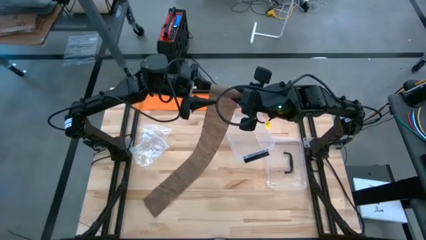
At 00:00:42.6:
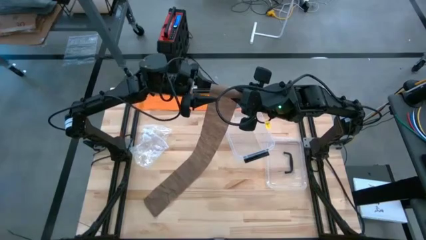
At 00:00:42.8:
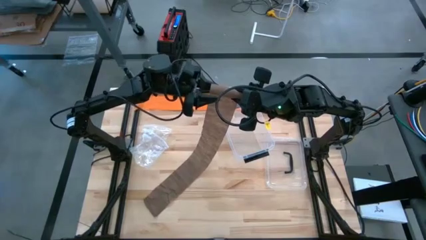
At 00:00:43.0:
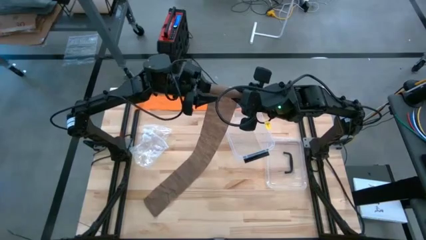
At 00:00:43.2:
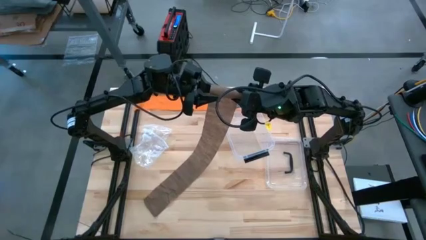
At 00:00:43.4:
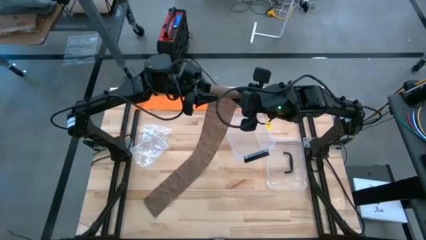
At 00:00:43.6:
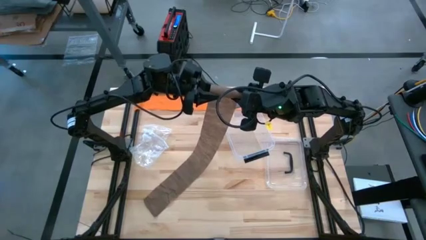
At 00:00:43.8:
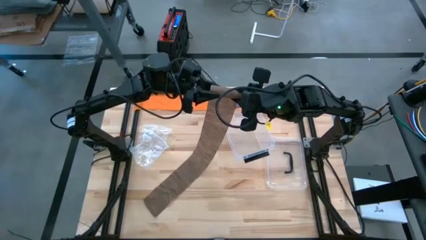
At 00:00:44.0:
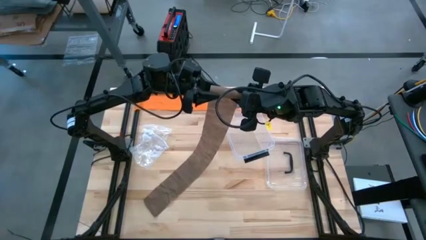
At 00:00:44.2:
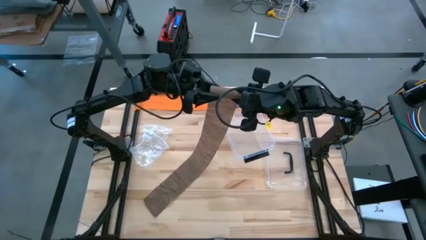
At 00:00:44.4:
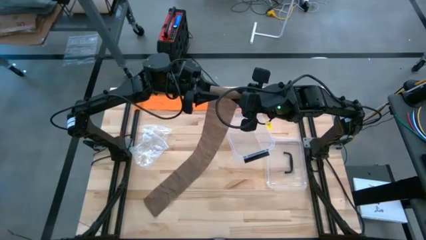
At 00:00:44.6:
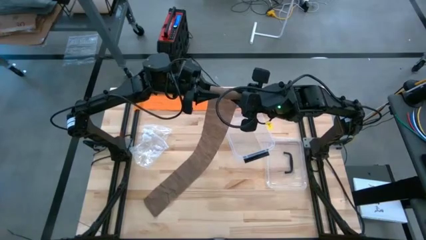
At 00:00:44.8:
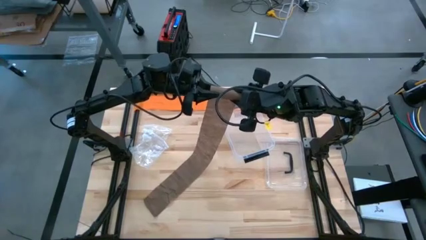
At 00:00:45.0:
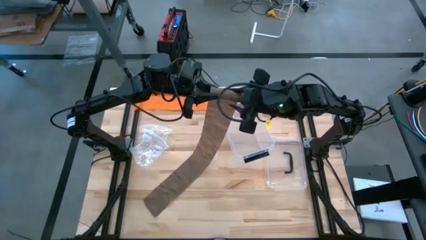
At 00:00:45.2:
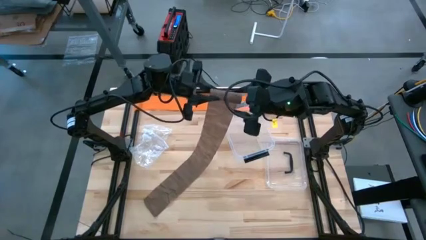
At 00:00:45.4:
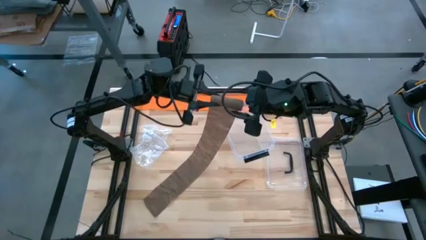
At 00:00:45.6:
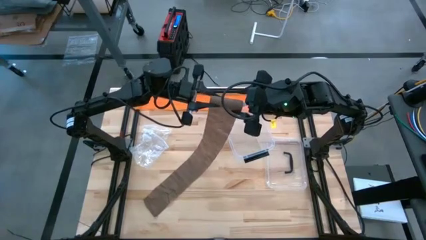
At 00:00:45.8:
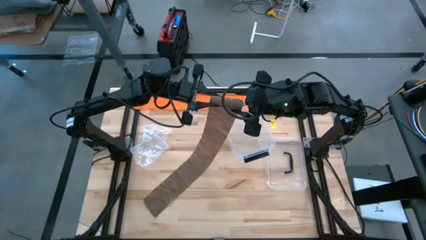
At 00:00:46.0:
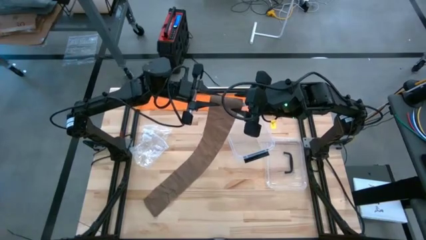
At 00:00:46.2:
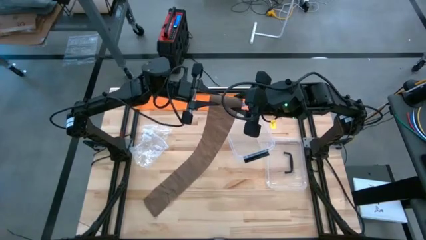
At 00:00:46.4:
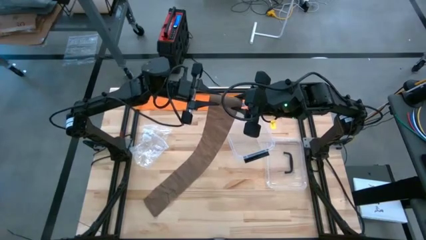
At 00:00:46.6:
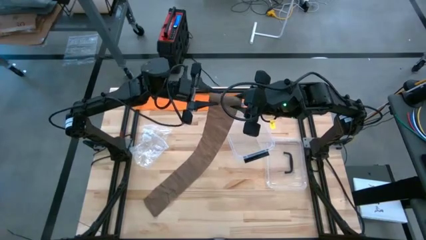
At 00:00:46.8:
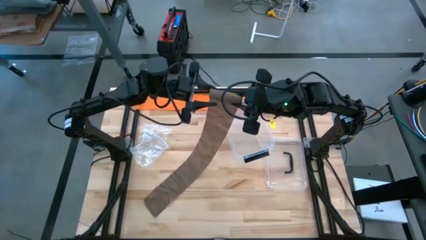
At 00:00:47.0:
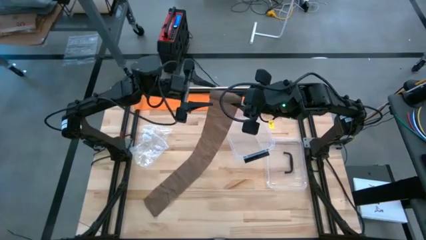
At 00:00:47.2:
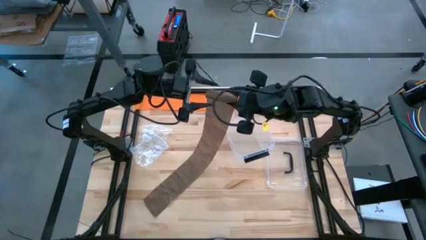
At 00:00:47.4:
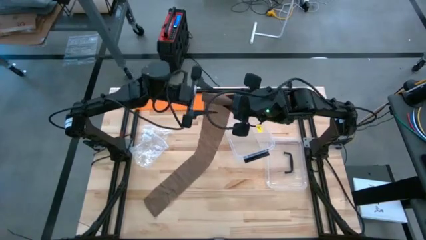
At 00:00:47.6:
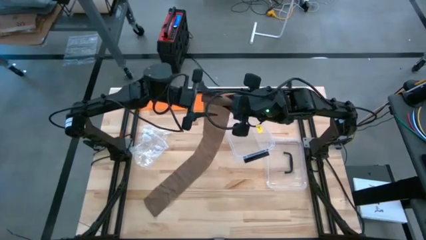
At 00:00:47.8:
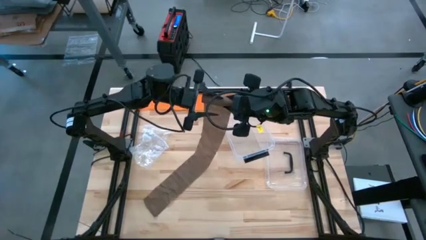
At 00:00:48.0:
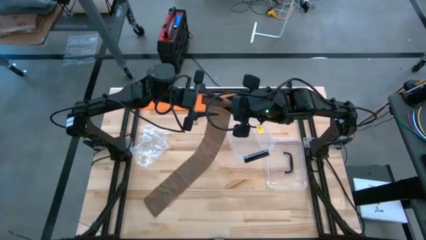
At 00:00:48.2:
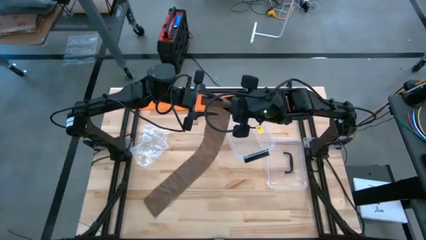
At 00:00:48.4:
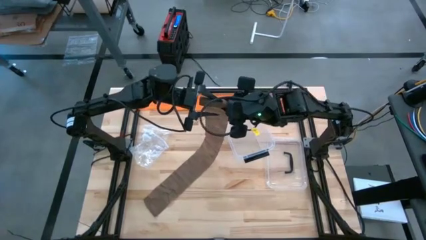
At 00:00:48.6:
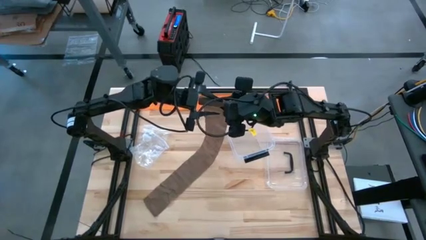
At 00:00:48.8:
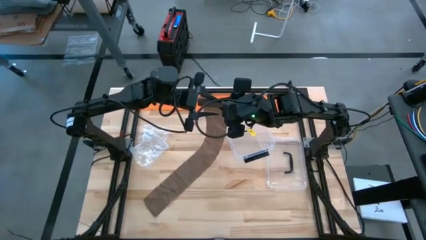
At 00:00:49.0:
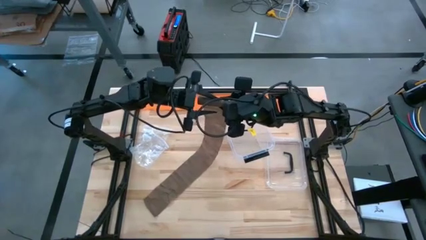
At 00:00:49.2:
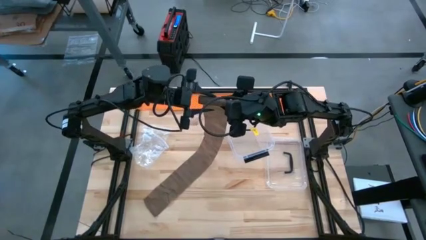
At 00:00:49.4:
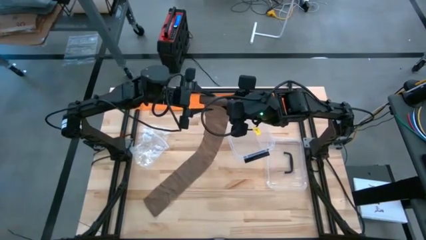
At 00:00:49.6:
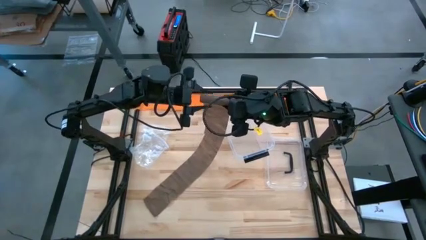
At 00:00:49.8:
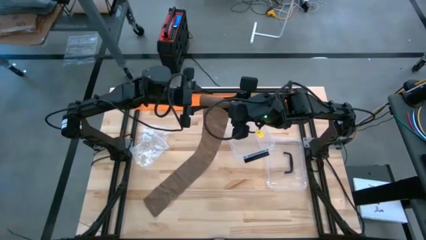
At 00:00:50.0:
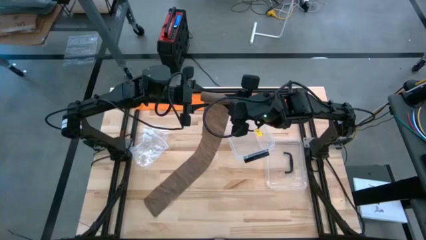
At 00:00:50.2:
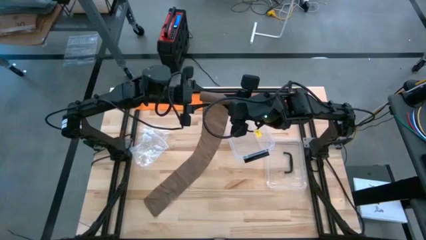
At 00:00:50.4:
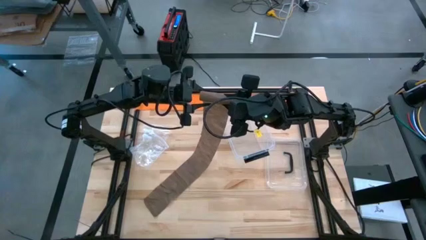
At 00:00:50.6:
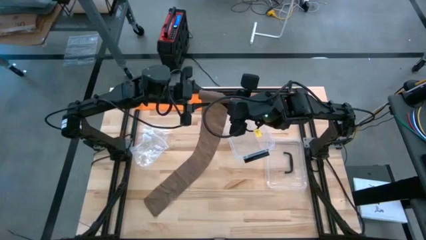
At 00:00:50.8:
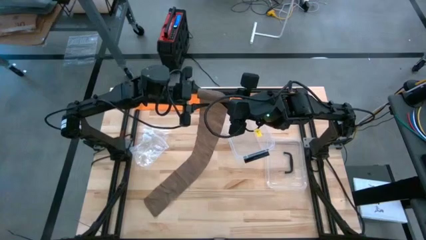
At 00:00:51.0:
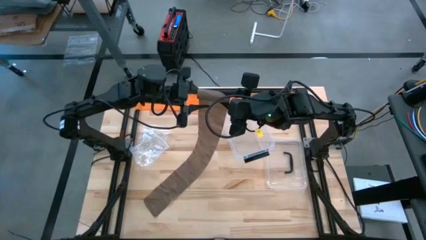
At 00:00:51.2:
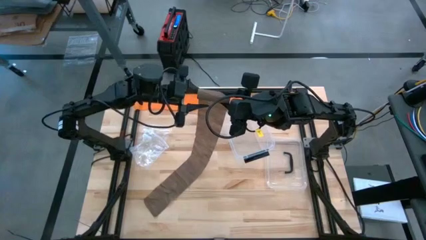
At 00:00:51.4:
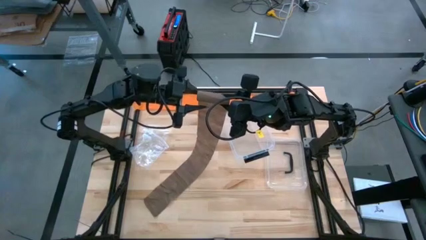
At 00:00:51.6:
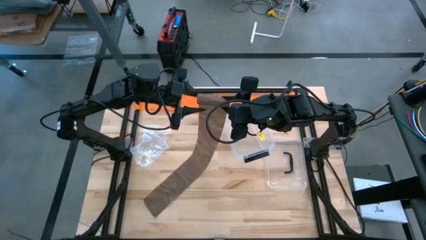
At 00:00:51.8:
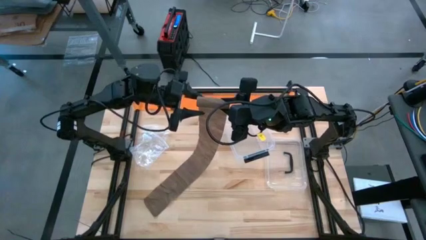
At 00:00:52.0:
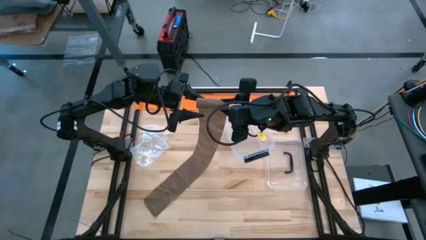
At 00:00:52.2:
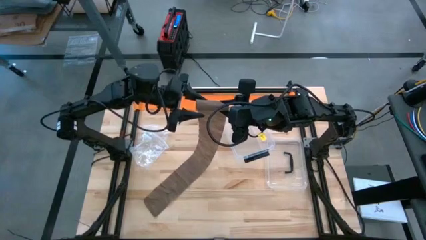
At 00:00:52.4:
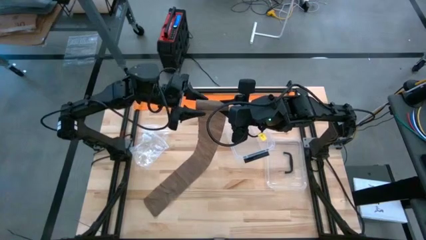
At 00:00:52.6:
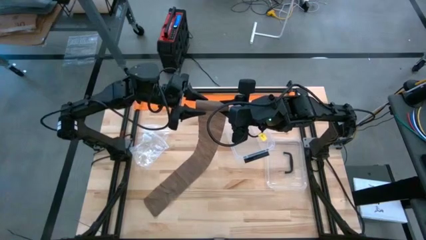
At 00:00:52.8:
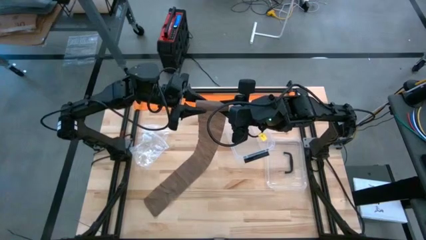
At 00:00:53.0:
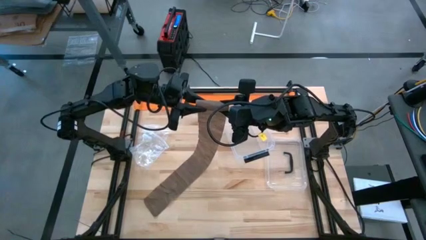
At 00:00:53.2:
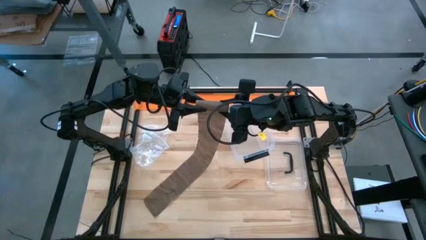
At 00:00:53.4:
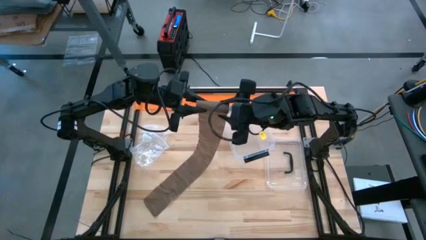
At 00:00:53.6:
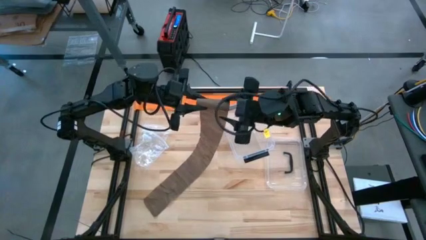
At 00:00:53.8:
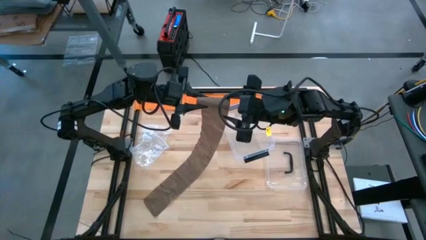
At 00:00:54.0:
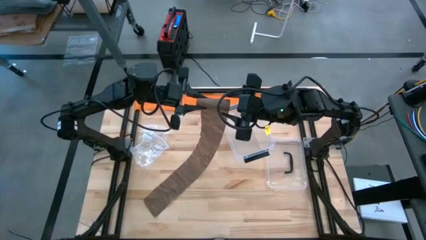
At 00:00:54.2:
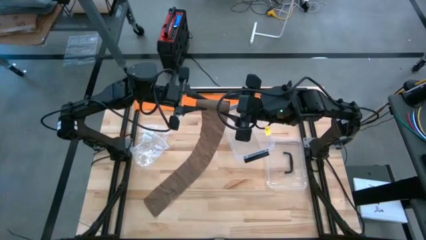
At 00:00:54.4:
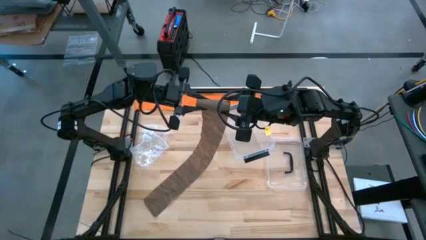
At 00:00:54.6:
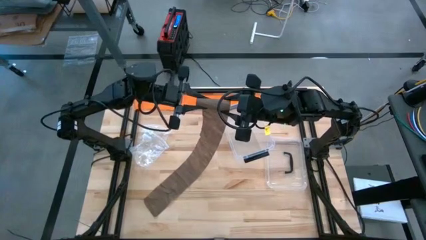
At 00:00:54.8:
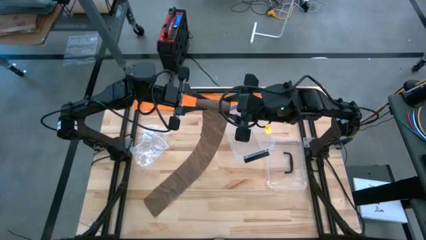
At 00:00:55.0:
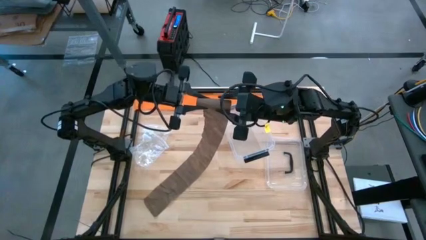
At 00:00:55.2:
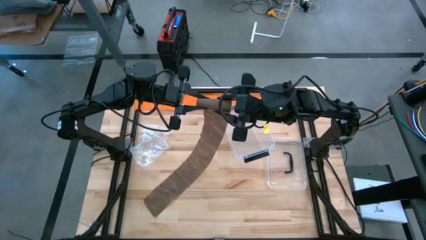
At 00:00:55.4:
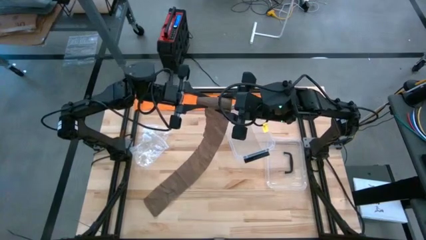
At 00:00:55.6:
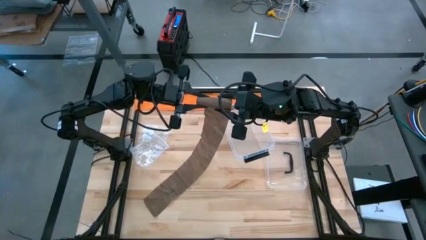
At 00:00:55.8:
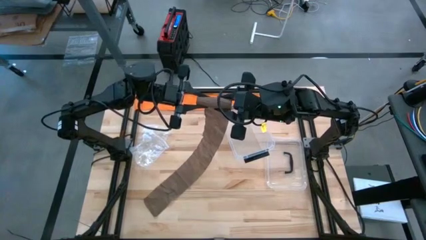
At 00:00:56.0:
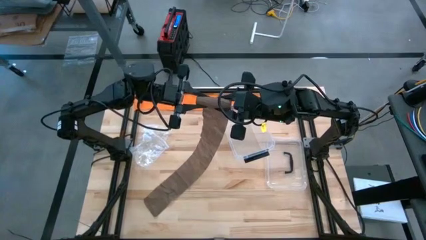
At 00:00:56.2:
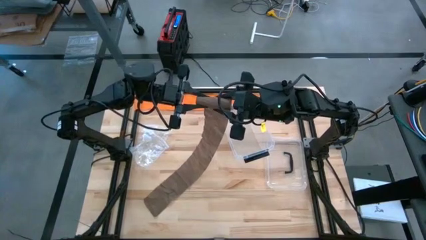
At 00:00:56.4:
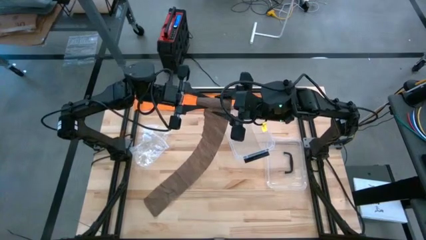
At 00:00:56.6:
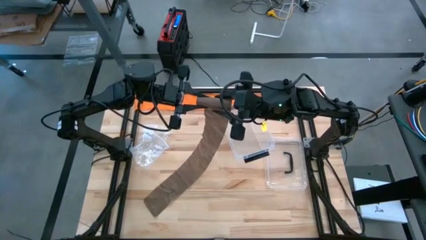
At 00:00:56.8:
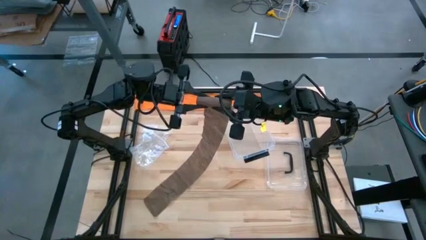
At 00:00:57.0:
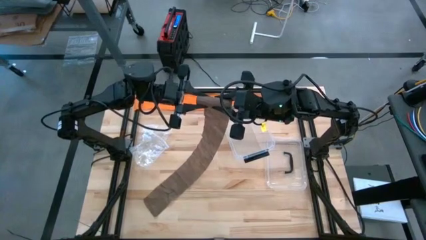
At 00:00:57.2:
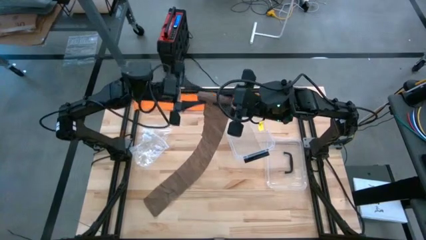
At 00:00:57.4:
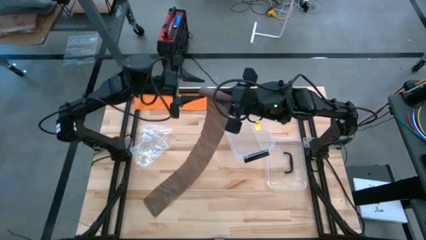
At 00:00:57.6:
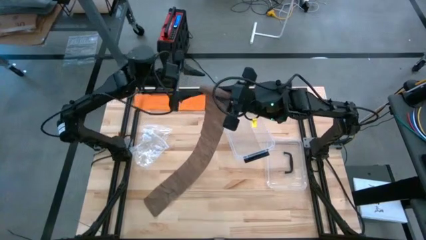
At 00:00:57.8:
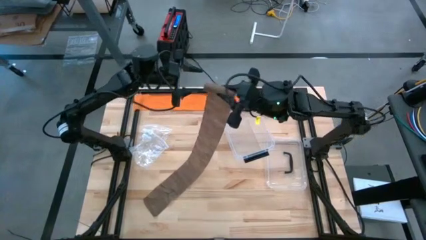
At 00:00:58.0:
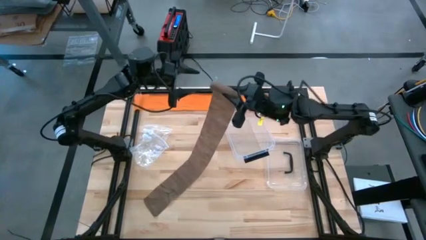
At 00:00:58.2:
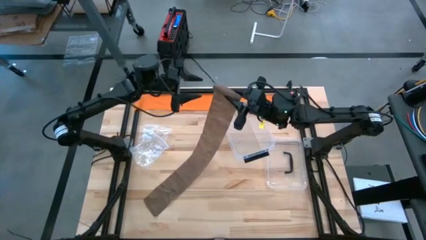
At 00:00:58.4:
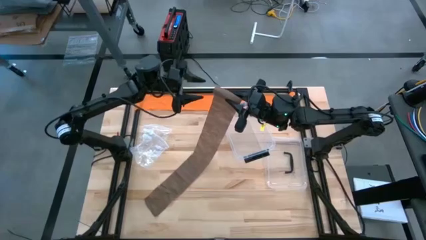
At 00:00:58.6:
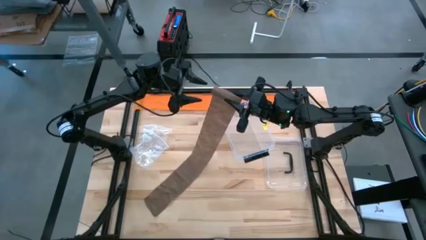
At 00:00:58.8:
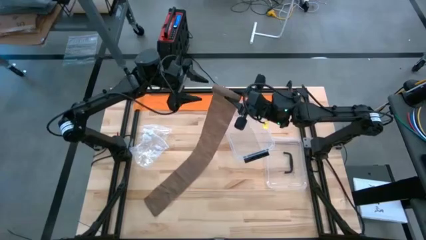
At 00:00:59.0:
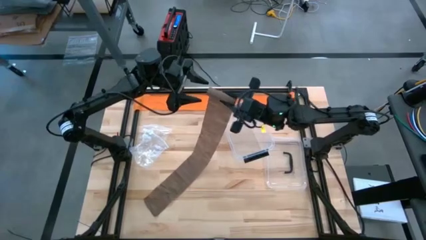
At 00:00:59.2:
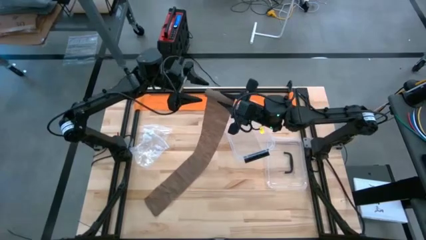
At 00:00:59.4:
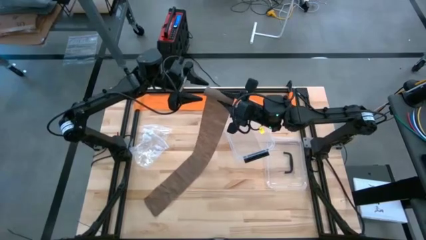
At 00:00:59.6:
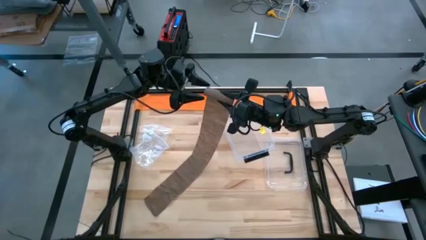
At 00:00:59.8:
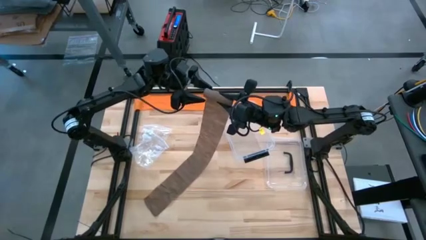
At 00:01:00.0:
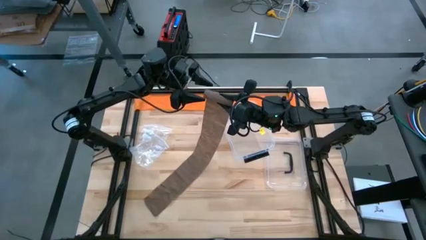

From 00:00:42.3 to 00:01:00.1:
Task: Roll bandage
Roll the brown bandage
